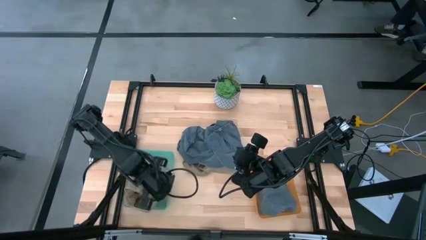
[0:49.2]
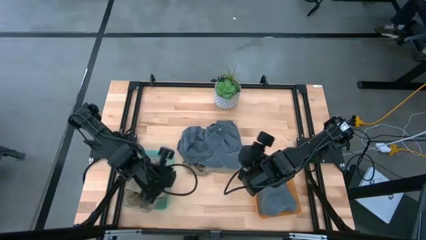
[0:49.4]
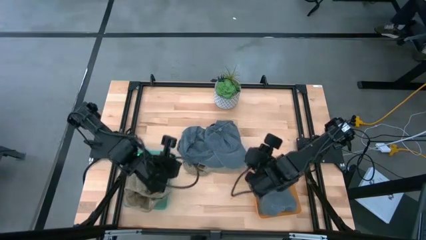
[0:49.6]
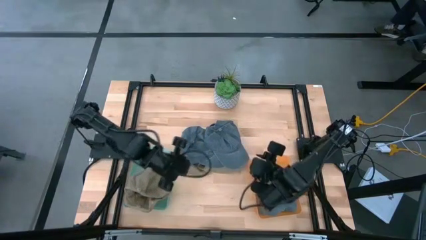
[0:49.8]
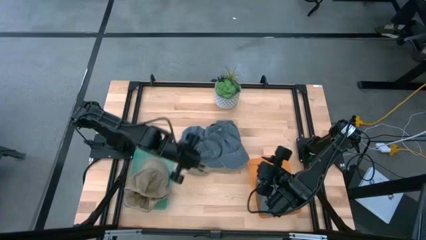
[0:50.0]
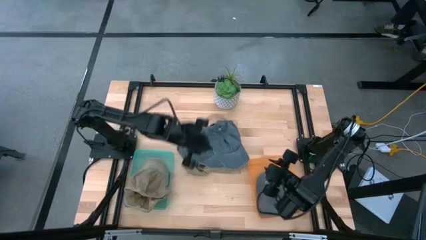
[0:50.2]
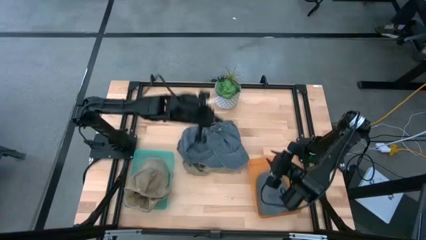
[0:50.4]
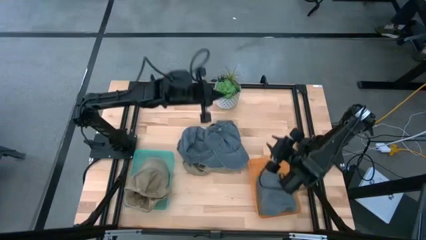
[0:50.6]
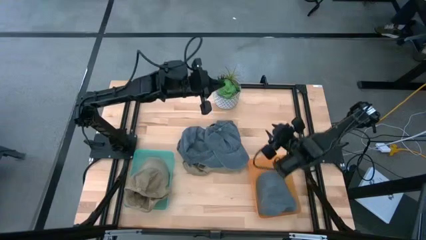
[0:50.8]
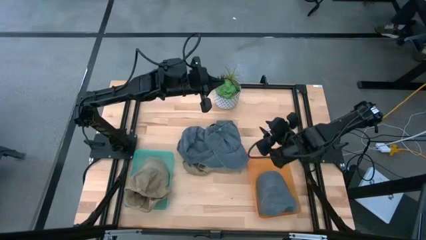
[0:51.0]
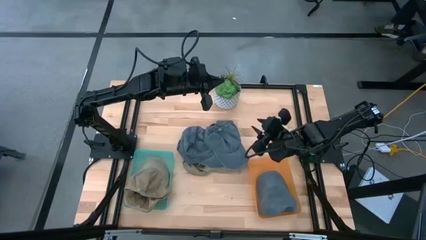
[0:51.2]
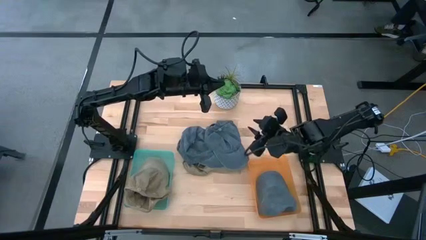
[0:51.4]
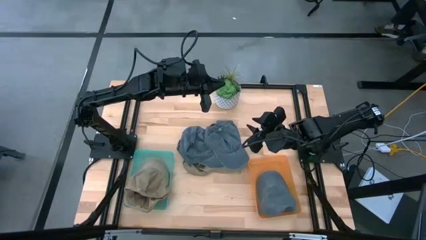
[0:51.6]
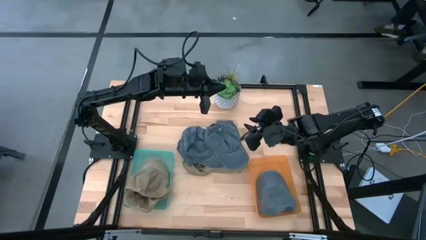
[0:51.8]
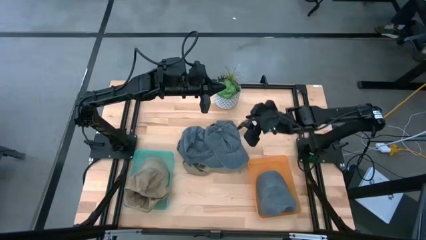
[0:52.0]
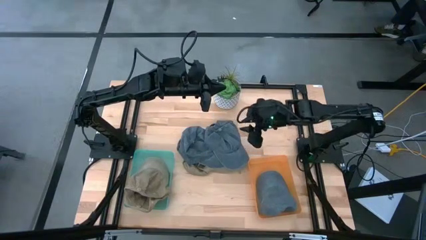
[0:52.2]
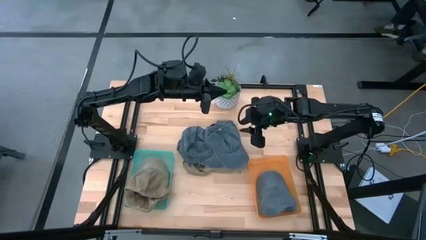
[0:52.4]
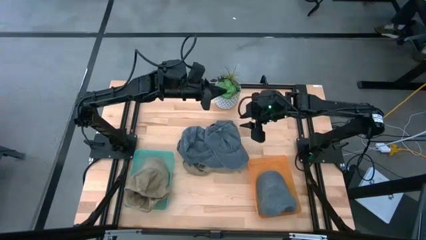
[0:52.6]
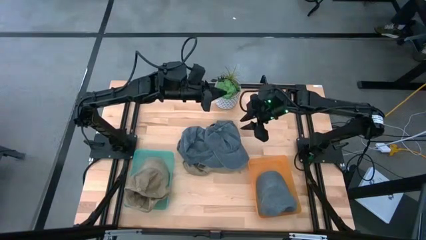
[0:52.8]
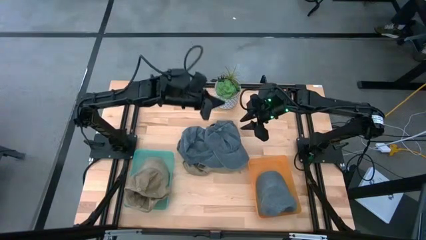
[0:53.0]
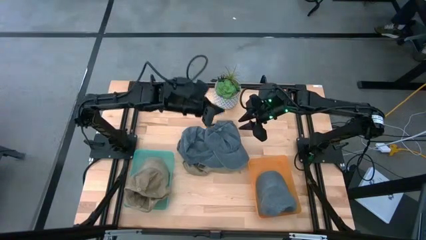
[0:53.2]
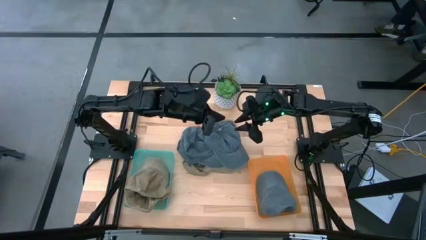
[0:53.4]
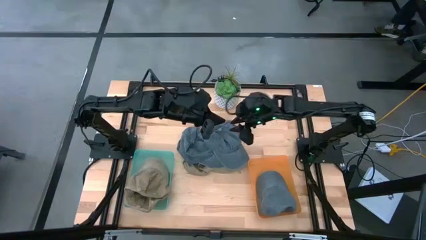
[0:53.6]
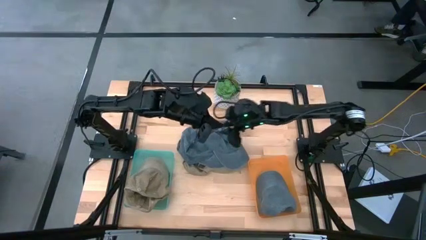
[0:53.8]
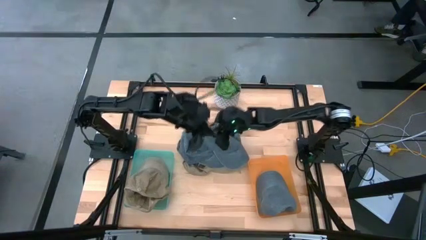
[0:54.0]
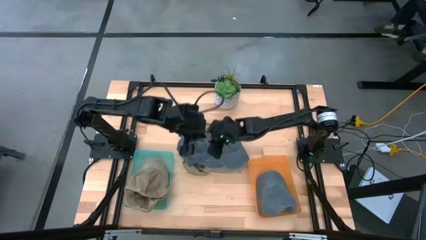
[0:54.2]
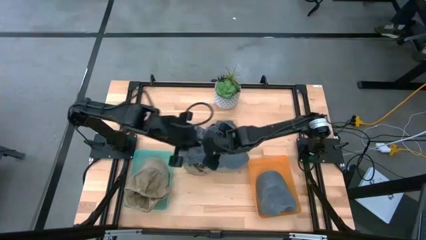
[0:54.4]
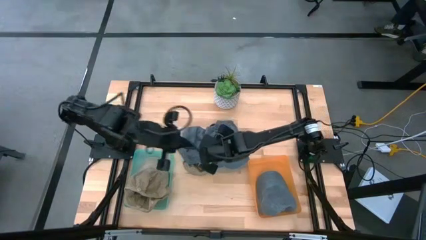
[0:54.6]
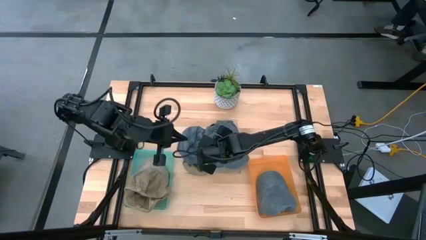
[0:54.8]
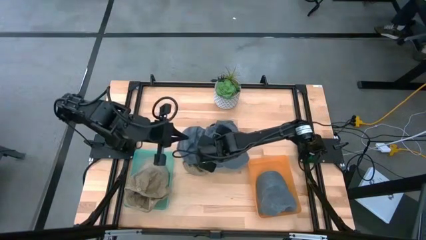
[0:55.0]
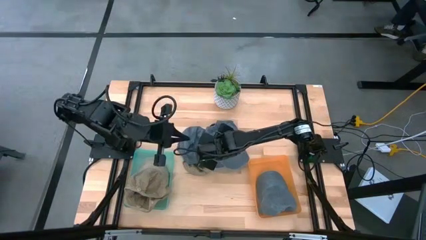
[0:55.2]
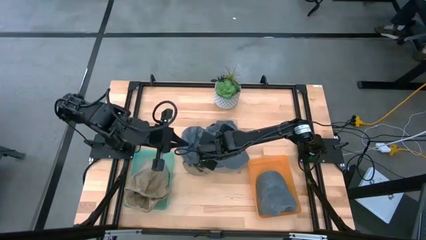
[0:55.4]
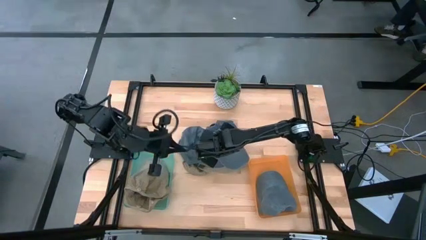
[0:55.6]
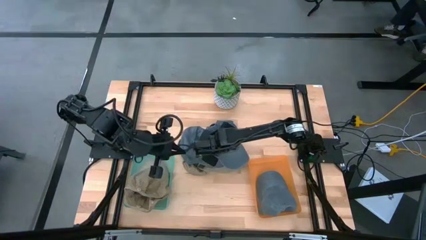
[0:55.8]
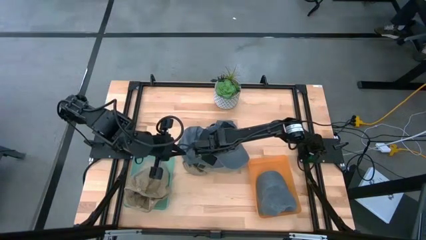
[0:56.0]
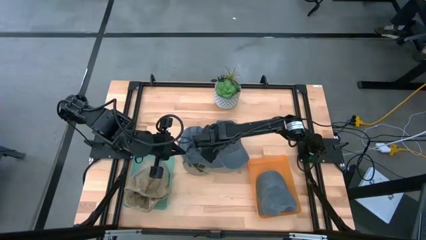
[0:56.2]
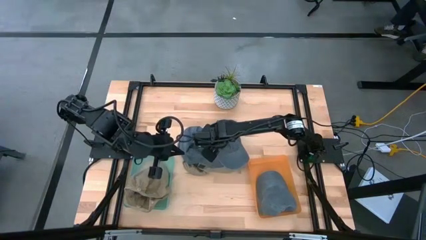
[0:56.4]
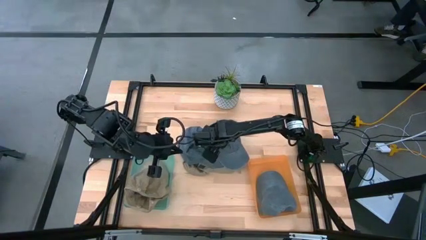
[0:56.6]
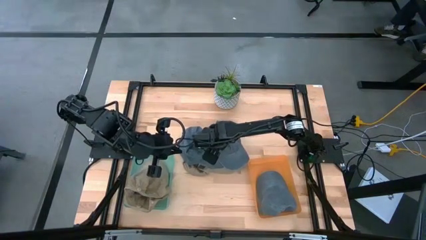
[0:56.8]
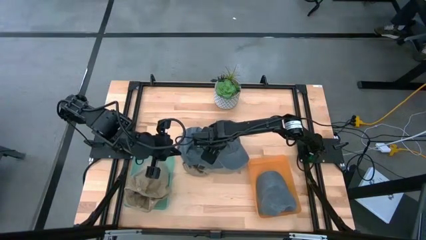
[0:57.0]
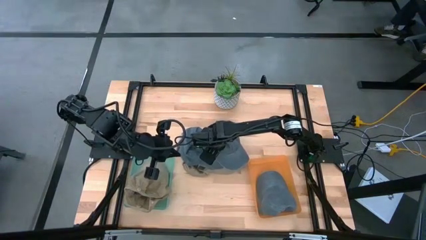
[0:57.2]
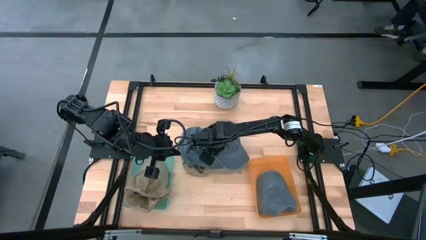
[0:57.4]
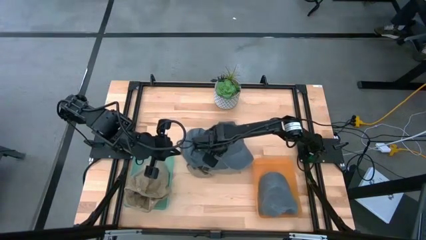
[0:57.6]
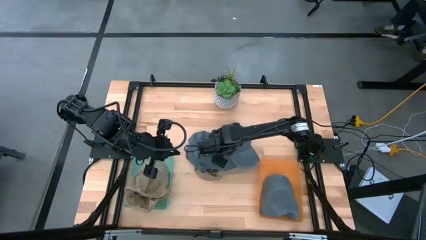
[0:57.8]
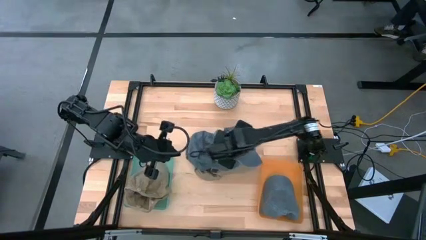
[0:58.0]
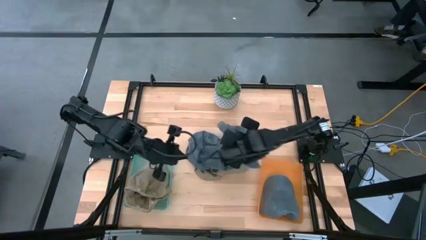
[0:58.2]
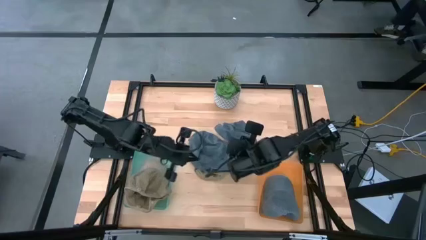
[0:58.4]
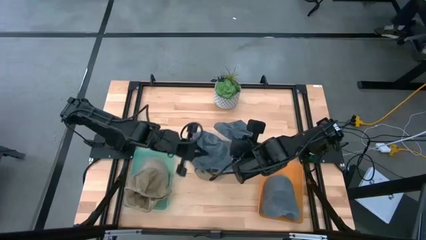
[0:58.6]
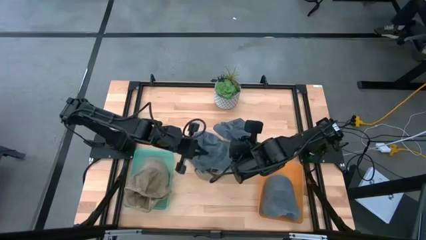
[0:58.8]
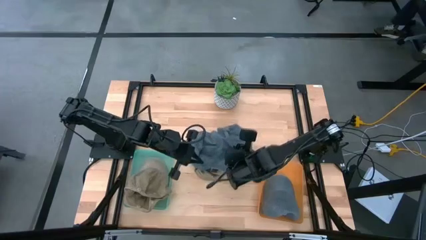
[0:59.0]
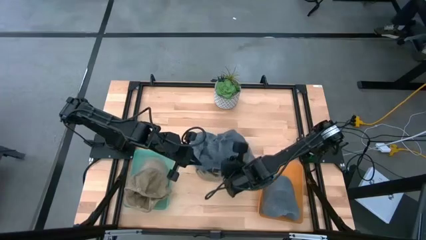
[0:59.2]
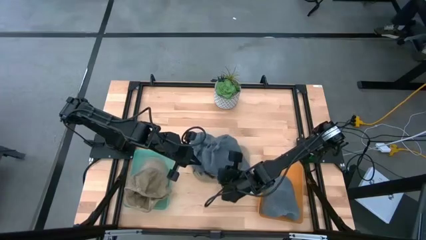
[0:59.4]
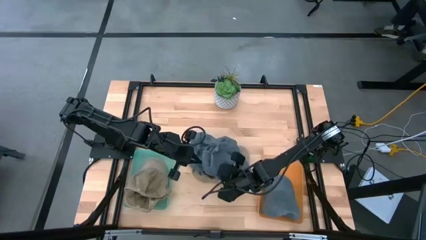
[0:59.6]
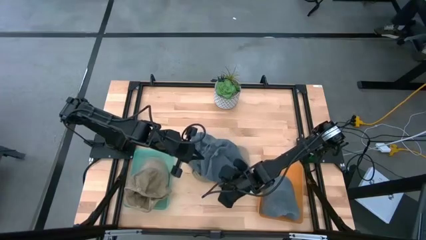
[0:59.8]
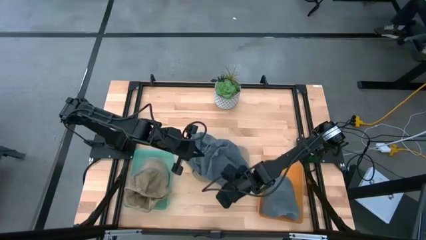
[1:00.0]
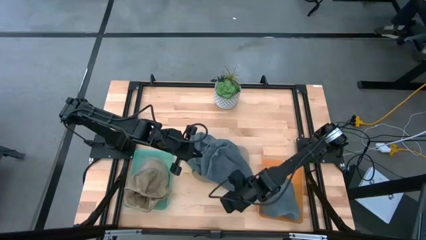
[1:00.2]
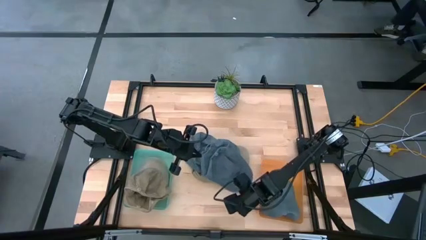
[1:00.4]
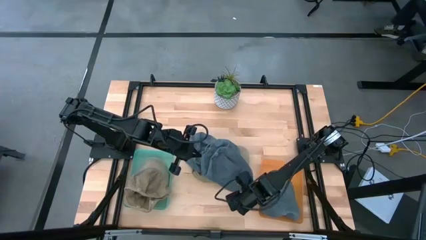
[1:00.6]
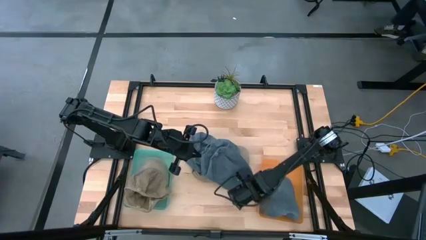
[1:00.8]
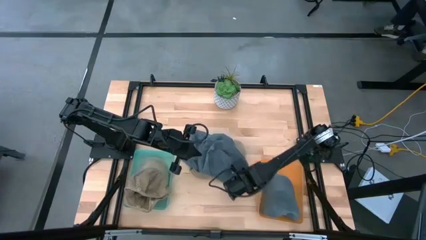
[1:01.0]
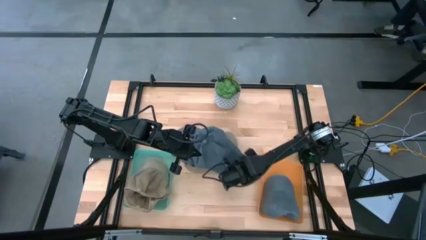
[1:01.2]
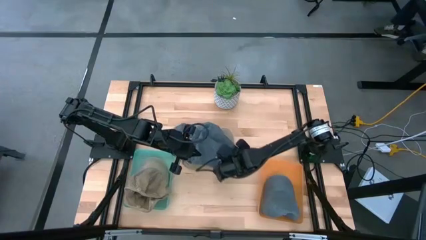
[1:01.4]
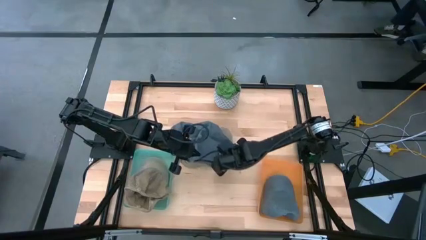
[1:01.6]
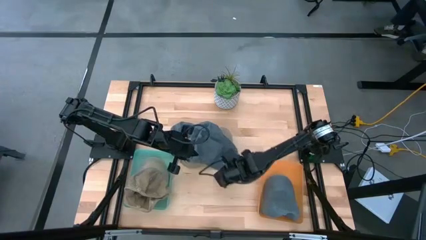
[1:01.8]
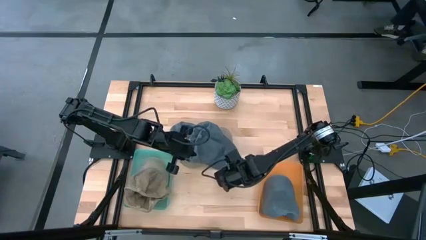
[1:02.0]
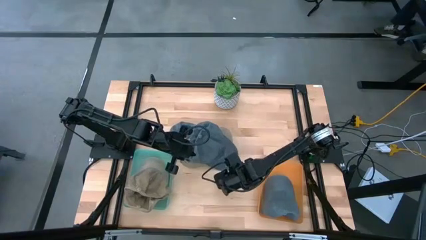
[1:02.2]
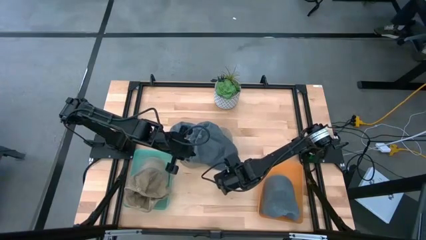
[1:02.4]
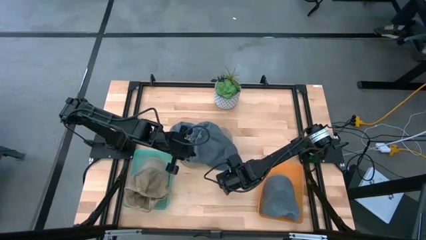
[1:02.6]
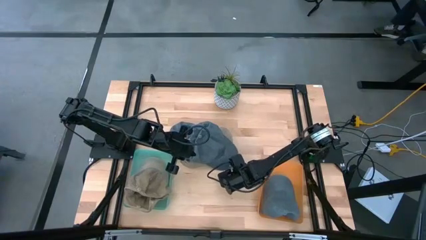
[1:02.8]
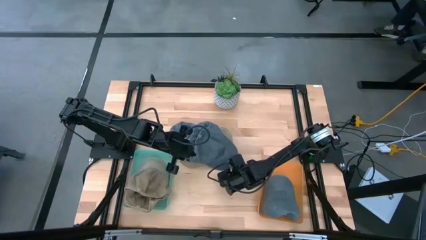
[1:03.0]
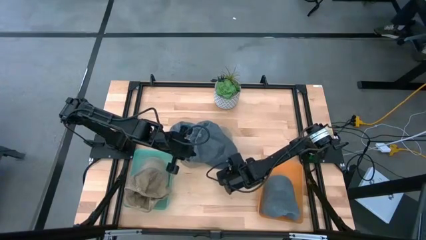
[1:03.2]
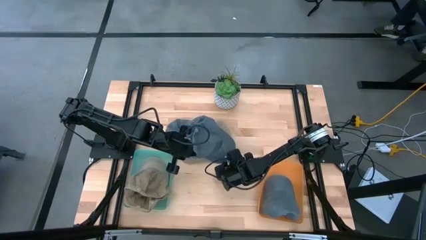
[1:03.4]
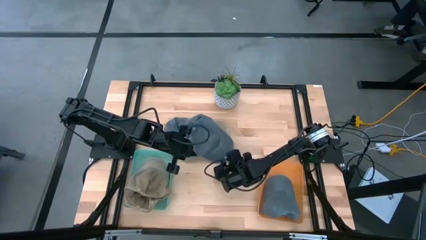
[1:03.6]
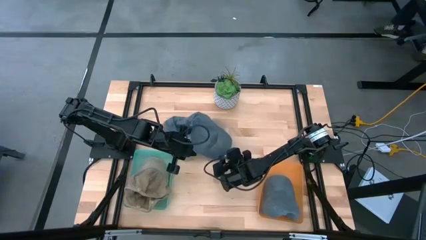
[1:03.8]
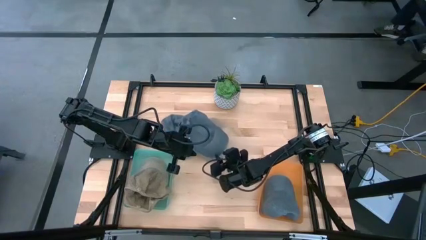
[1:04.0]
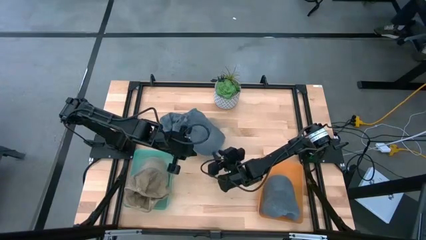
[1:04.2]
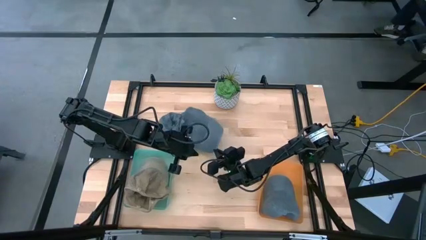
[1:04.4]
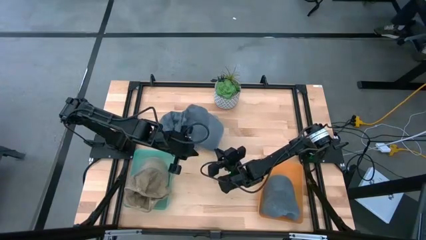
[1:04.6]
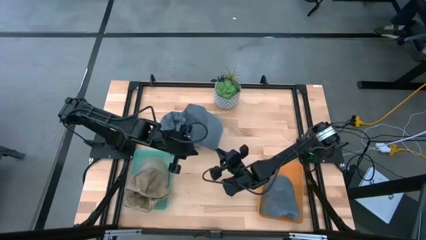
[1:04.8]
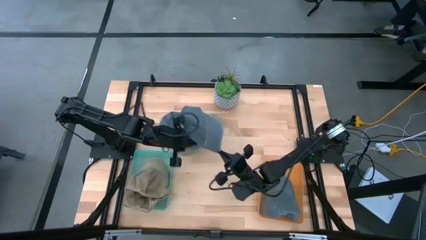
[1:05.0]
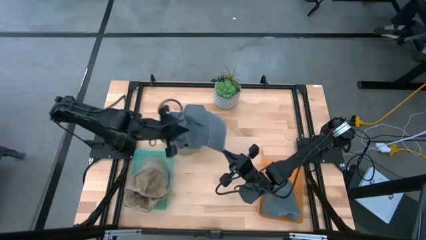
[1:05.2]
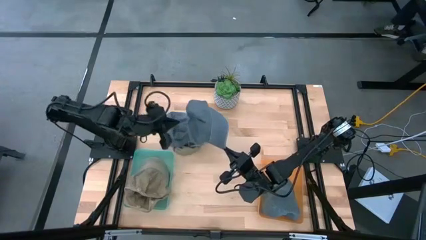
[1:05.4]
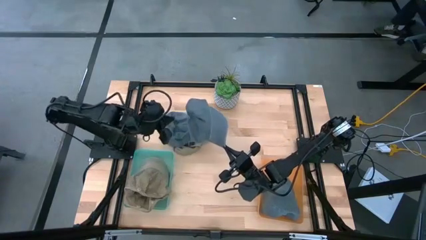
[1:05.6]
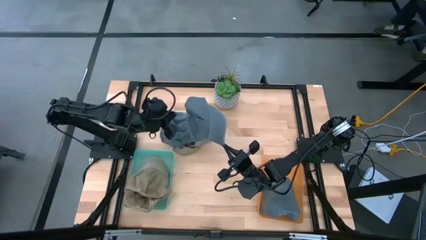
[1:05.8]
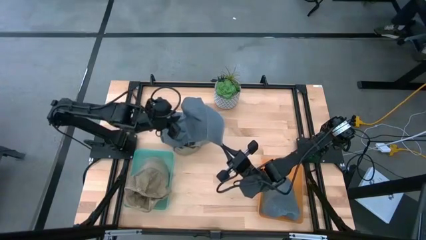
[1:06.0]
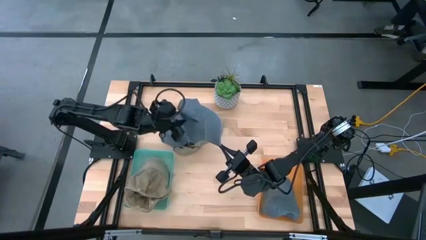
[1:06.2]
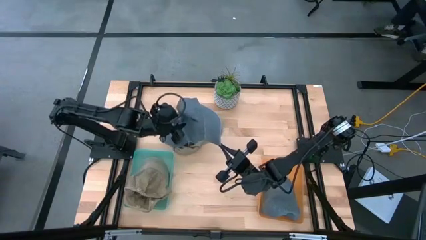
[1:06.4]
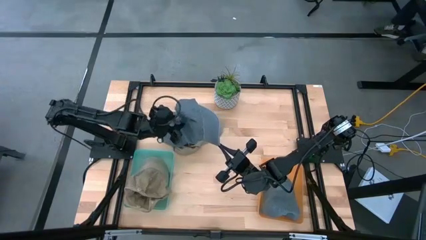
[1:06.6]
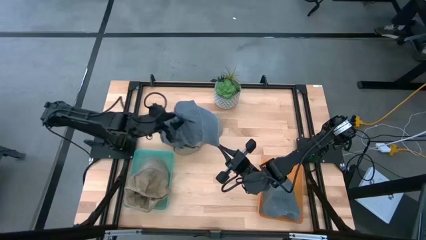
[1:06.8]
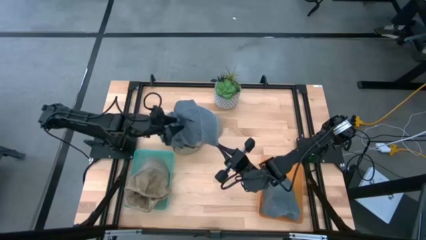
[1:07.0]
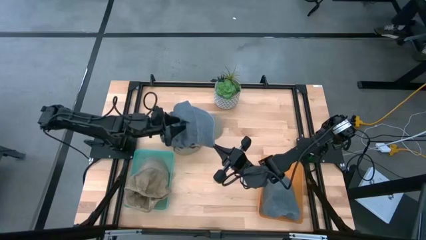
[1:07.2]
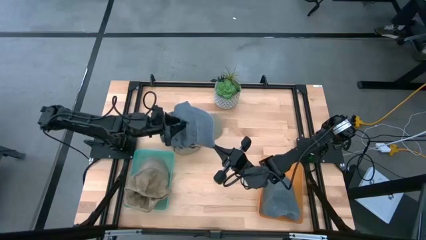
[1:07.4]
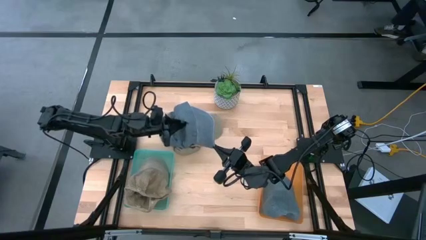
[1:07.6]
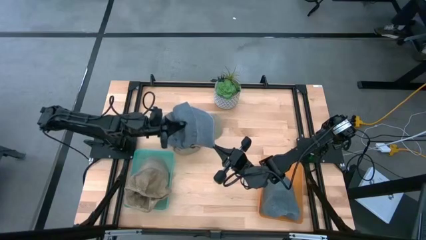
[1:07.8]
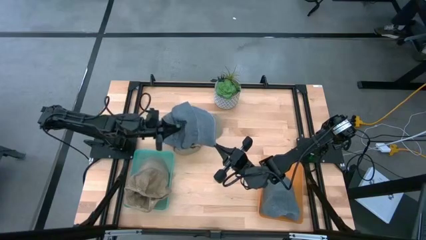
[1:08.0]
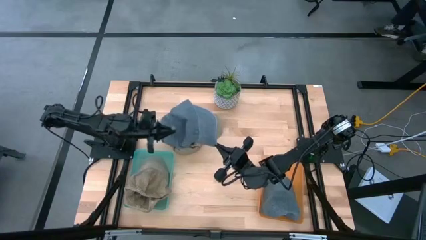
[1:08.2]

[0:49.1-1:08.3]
Task: Pick & Place hat
Put the blue cap into the orange bin
